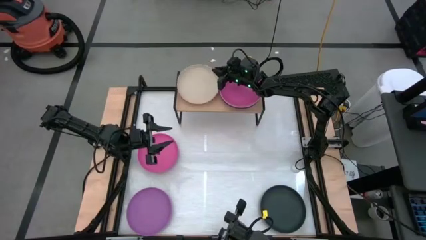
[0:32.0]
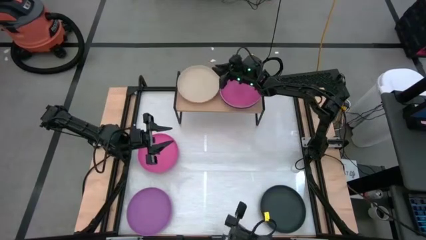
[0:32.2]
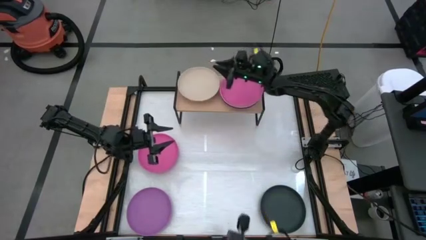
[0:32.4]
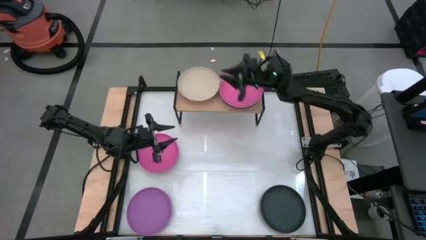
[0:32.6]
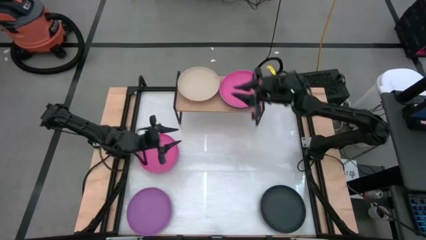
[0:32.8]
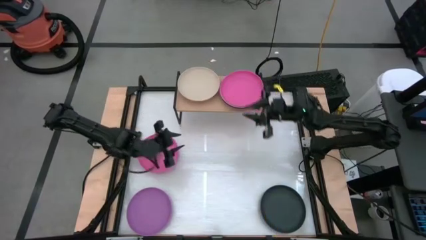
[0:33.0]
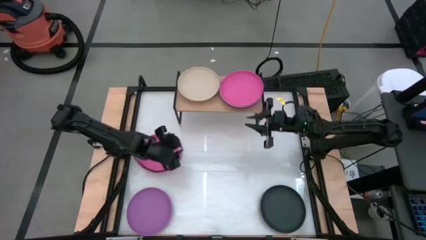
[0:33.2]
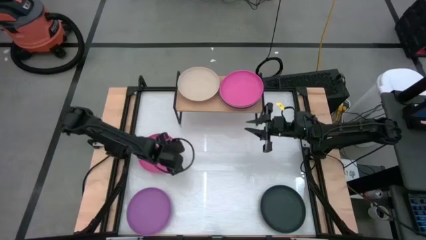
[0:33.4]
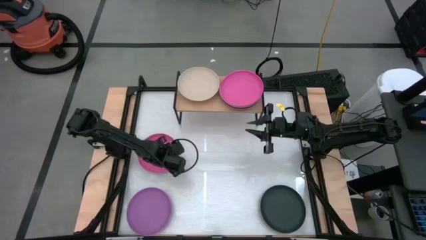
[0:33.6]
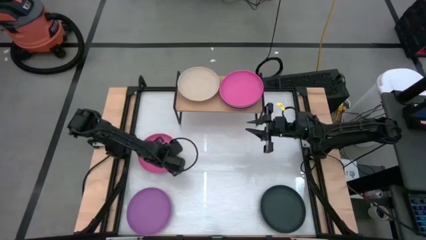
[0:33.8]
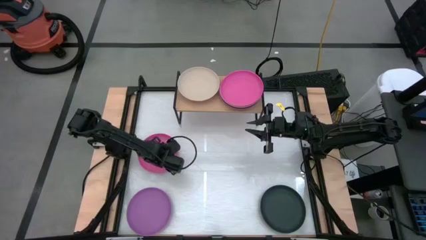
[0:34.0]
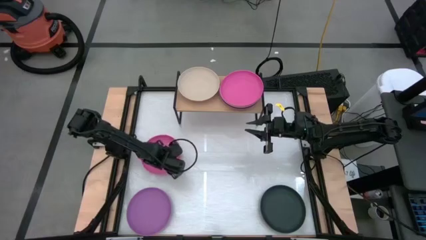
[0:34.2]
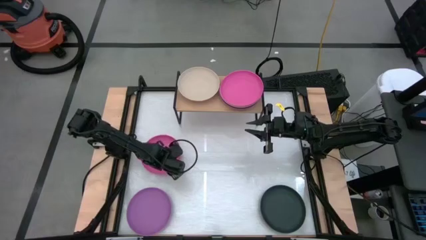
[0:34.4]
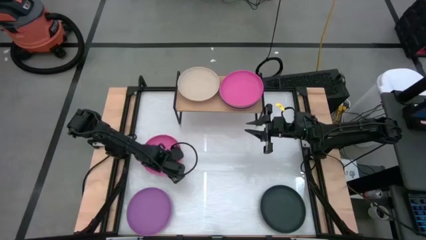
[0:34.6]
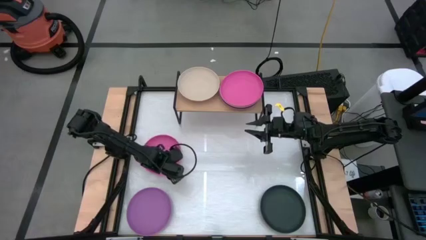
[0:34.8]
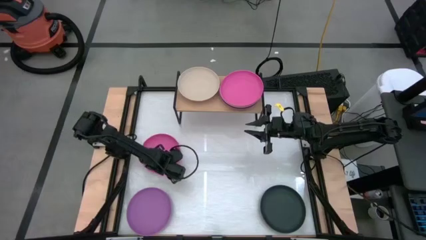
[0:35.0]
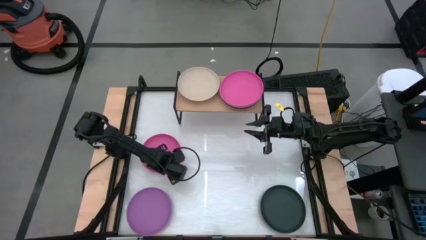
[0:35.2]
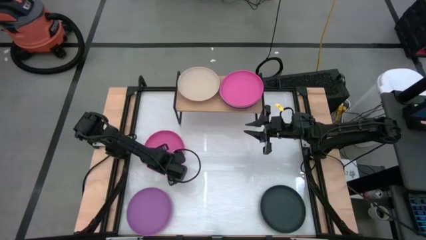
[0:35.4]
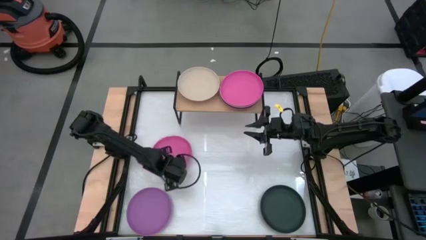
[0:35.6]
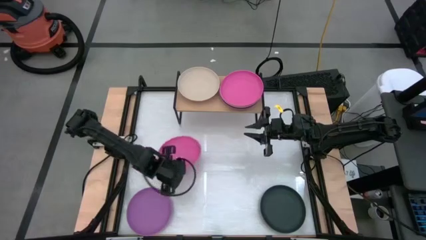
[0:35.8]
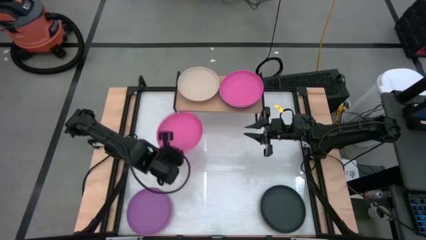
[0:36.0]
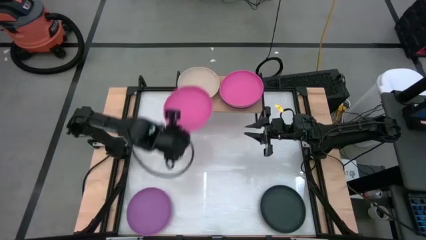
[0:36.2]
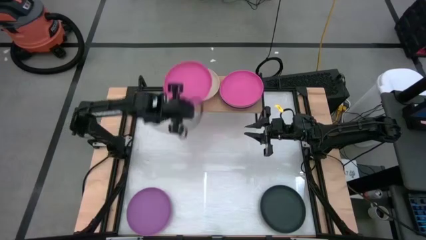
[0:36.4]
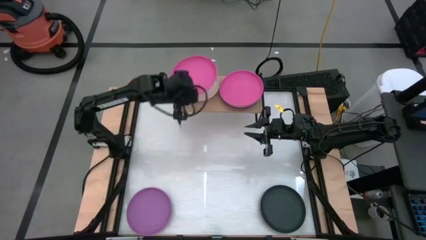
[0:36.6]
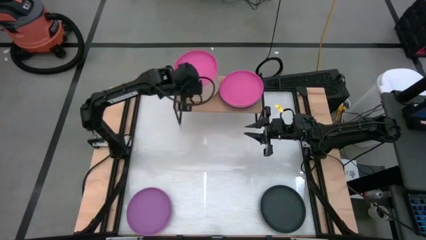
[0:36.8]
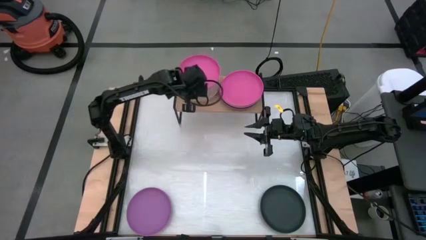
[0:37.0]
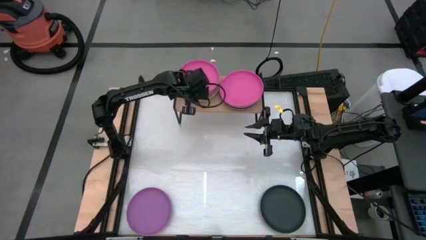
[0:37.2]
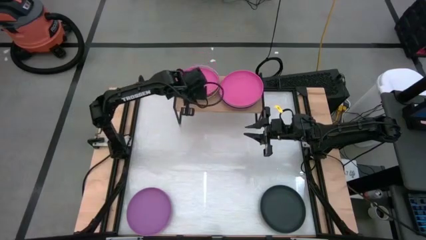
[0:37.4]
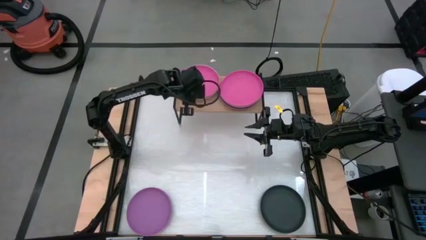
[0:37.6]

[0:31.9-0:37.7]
Task: Place and stack plates onto a shelf
Stack the pink plate on top of the white plate on the shelf

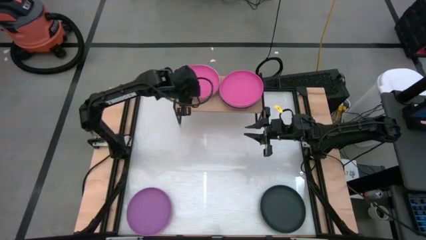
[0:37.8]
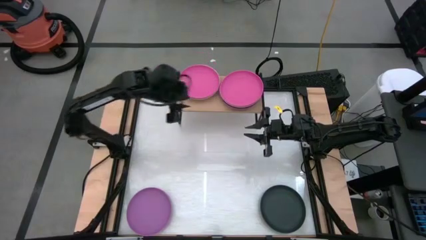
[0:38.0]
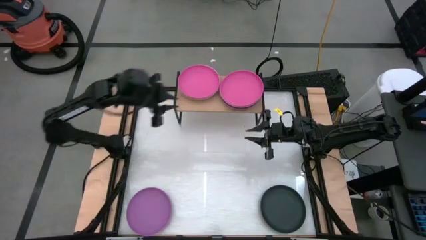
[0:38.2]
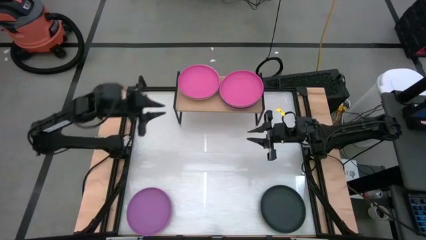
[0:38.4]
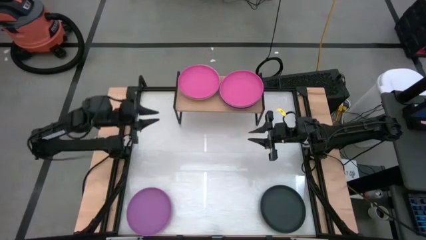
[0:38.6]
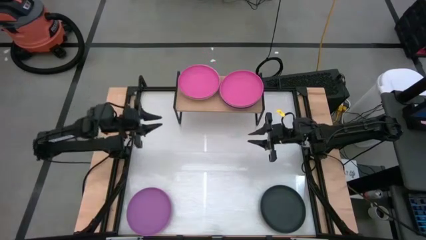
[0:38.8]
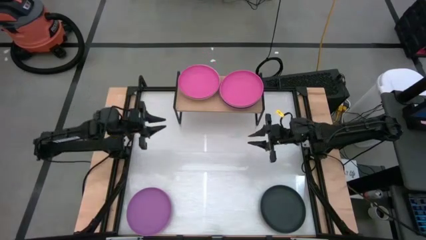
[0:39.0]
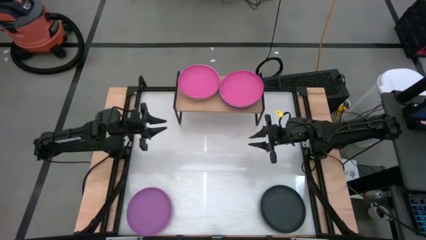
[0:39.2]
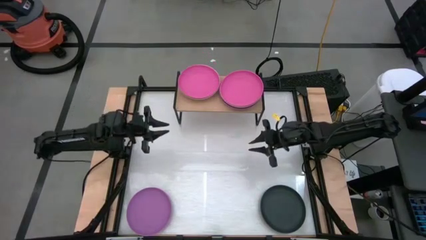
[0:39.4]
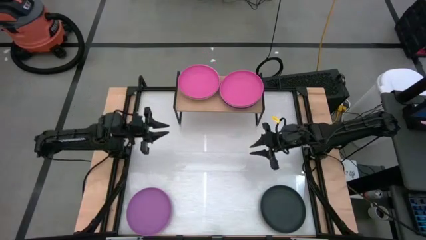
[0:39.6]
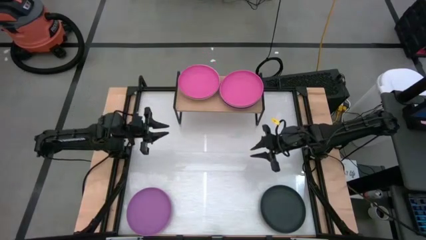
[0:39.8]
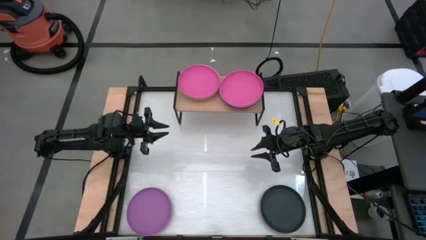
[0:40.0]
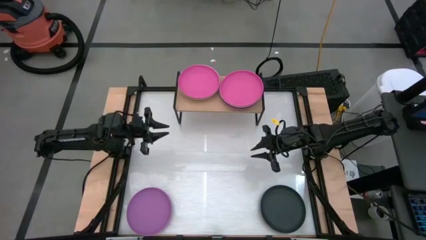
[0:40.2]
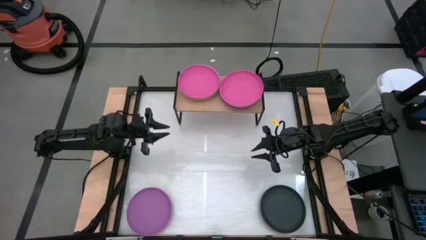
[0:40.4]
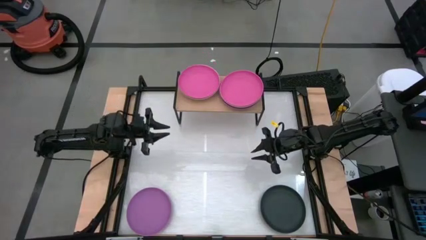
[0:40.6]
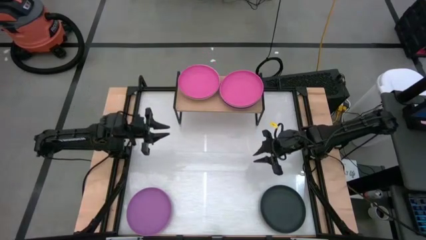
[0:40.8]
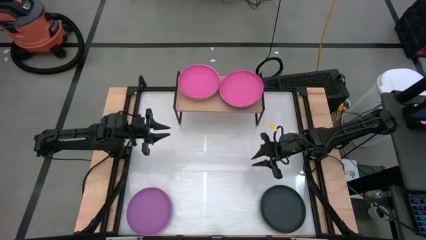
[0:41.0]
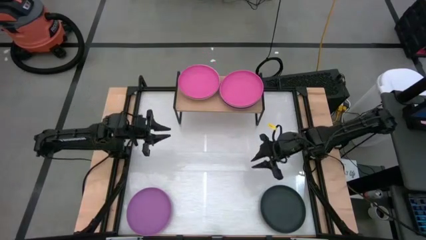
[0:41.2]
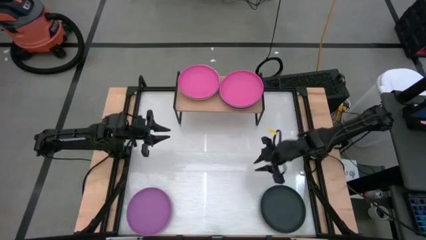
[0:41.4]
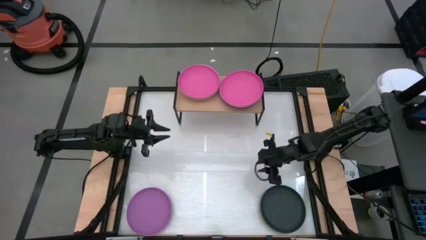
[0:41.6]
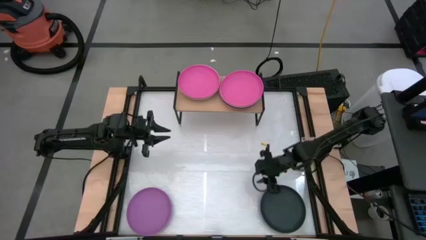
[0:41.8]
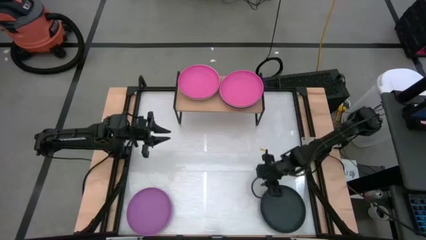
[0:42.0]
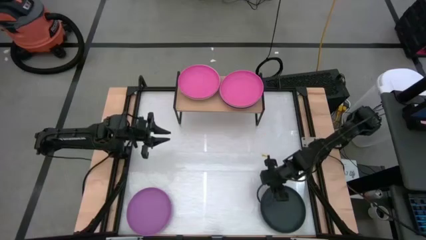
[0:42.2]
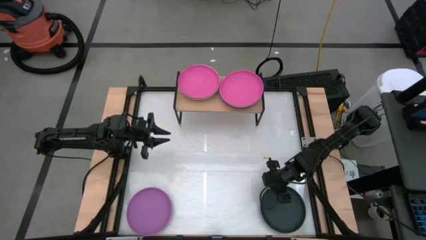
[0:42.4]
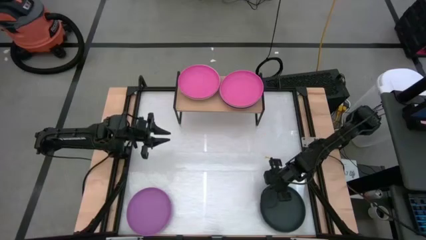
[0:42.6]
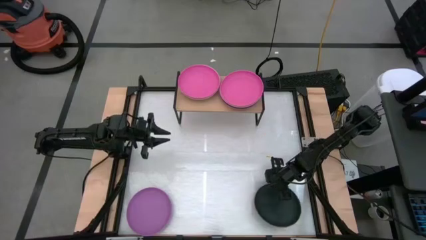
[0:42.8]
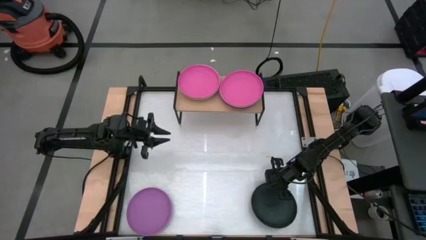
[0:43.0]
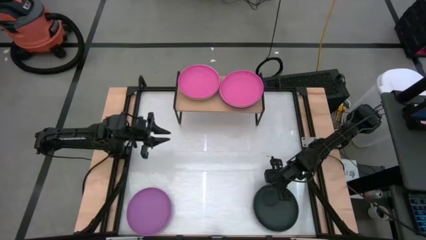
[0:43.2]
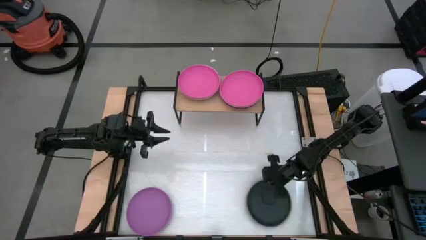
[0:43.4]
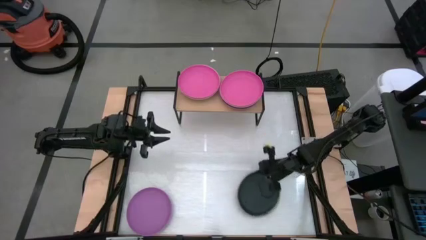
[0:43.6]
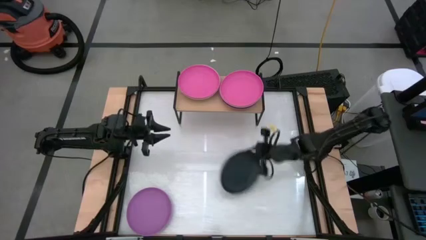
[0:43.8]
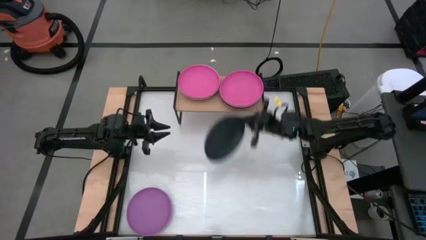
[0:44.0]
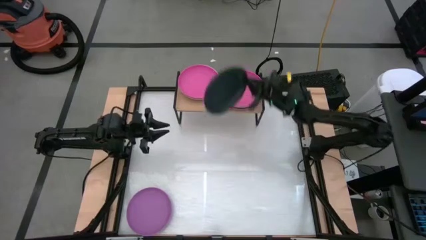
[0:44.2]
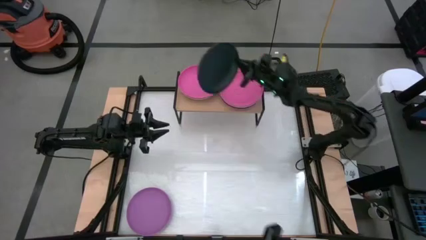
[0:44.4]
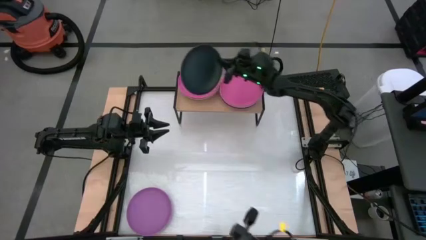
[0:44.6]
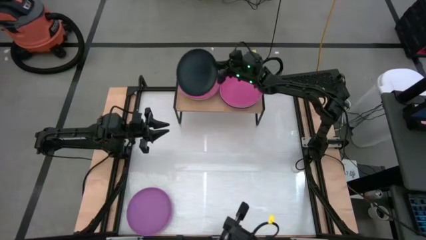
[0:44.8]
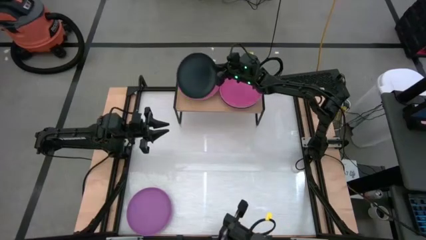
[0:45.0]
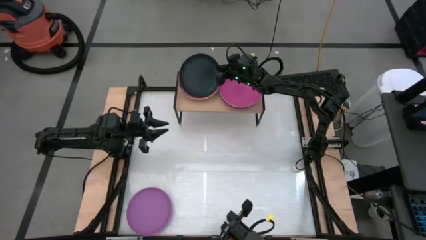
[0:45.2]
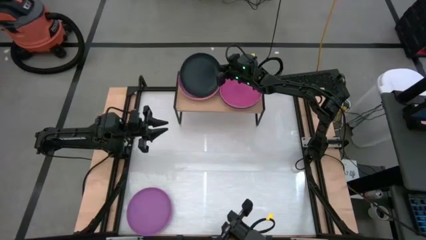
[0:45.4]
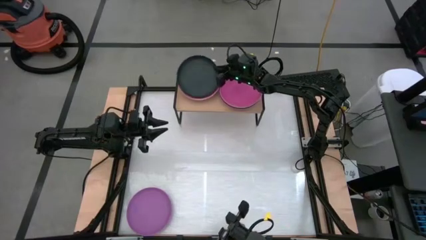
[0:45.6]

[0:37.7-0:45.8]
Stack the black plate on top of the left pink plate on the shelf

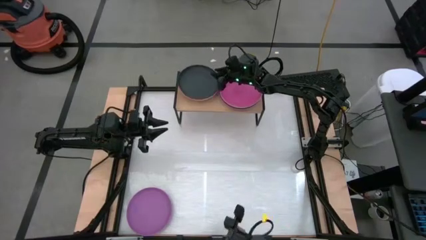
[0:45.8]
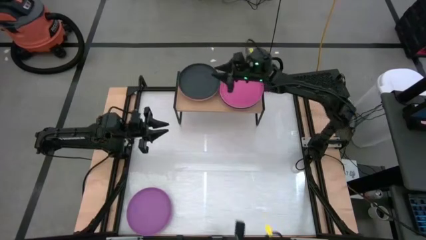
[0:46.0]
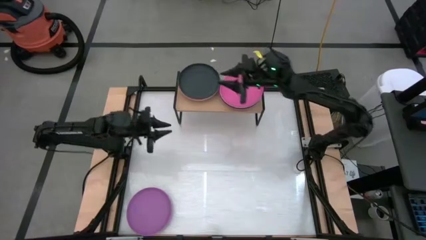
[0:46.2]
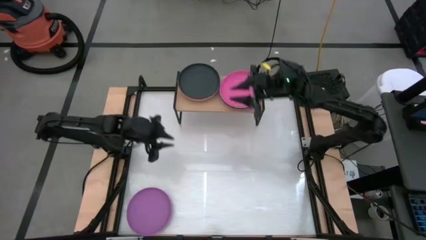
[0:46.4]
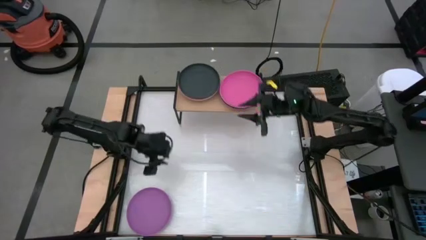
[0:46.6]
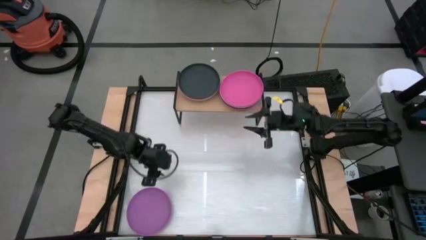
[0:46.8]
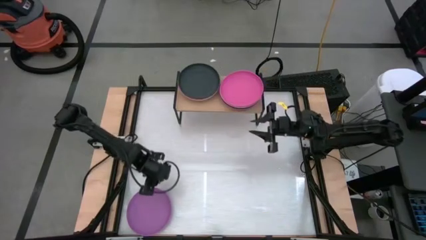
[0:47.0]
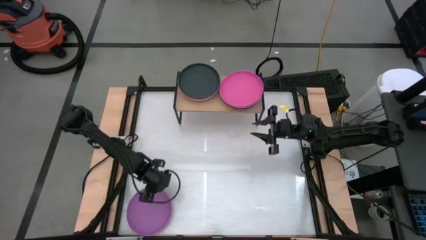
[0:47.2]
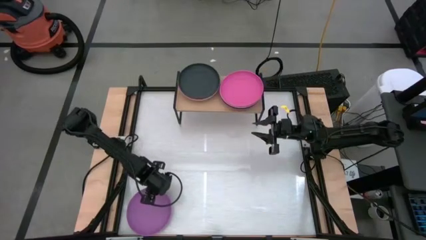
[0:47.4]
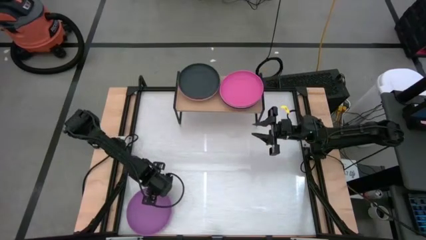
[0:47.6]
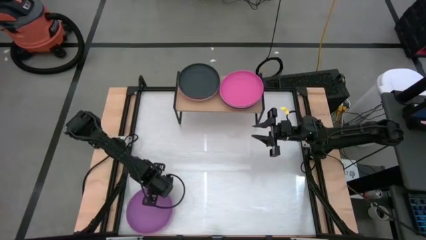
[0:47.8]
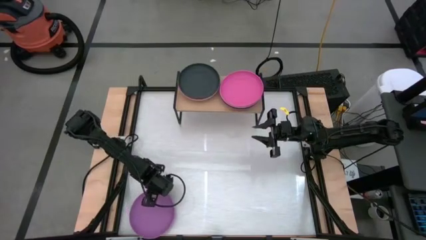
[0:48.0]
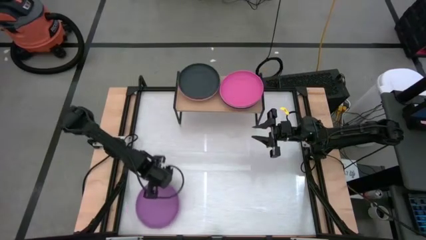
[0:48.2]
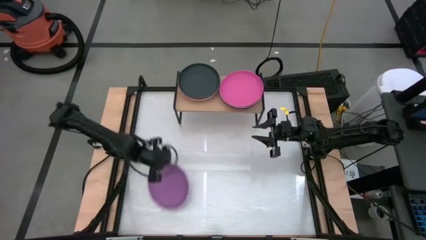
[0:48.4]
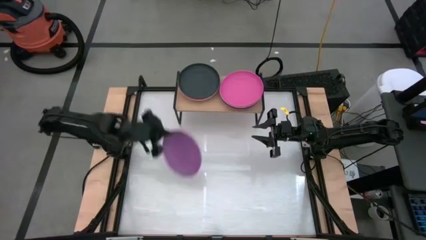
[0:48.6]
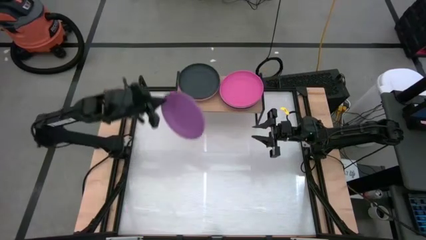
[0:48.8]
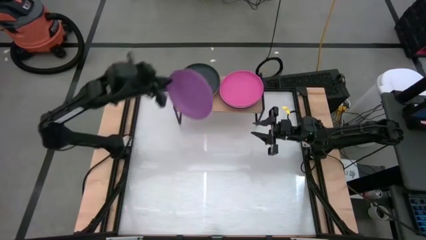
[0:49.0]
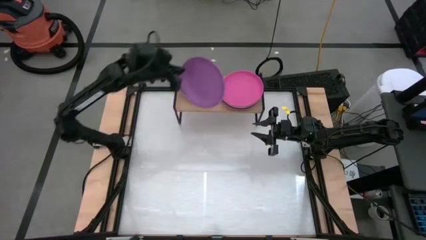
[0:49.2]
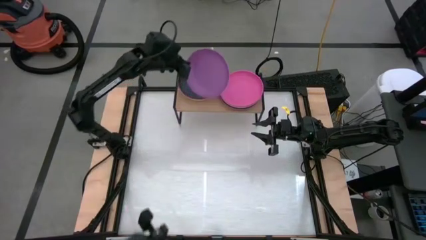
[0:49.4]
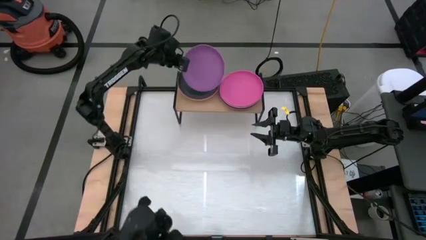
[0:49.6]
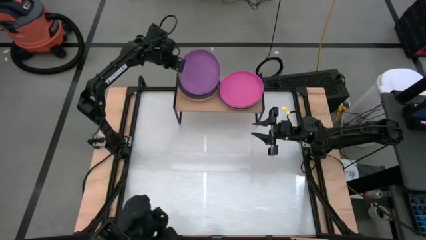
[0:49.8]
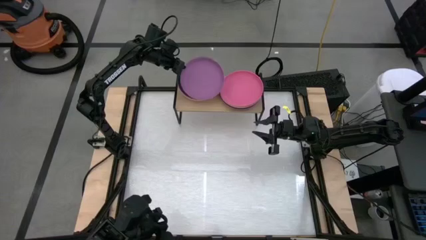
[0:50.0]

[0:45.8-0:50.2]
Stack the purple plate on top of the black plate on the shelf
